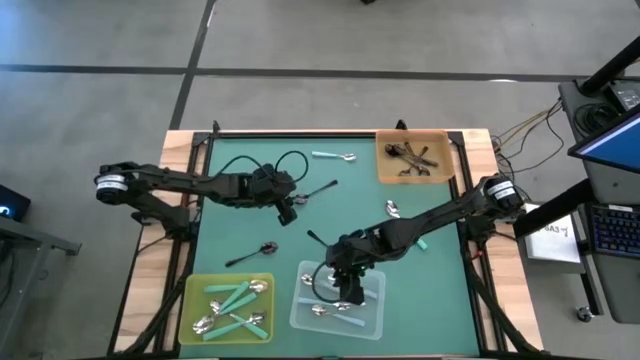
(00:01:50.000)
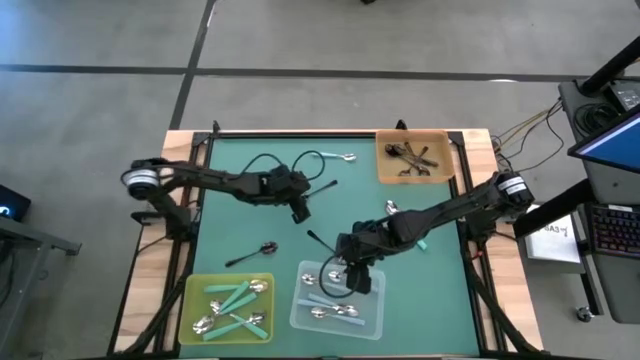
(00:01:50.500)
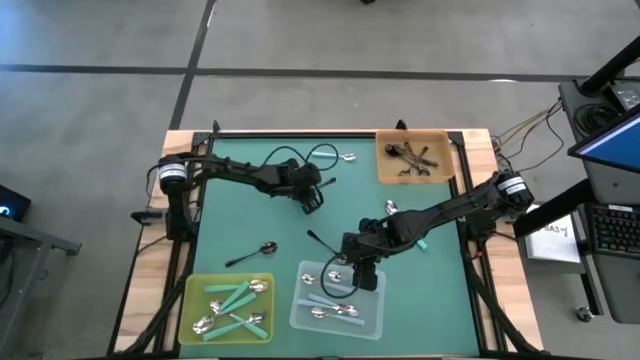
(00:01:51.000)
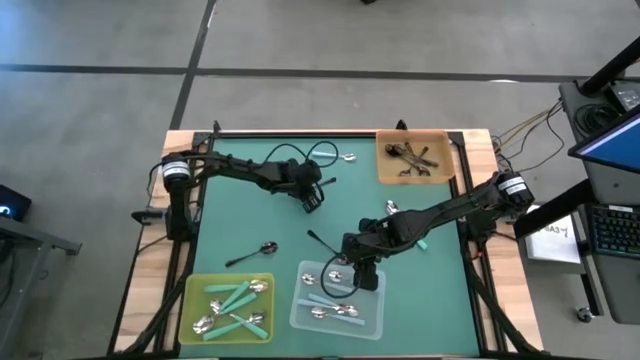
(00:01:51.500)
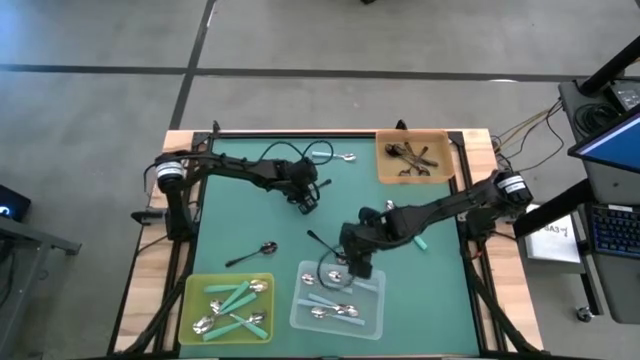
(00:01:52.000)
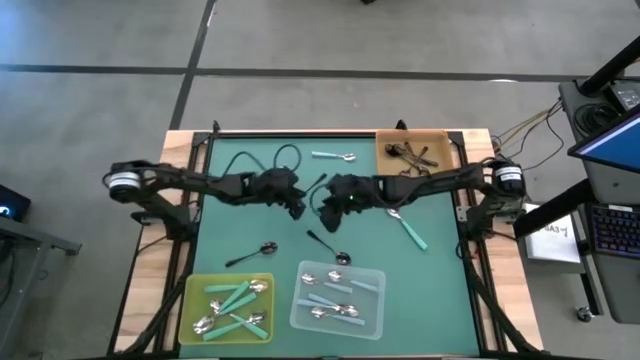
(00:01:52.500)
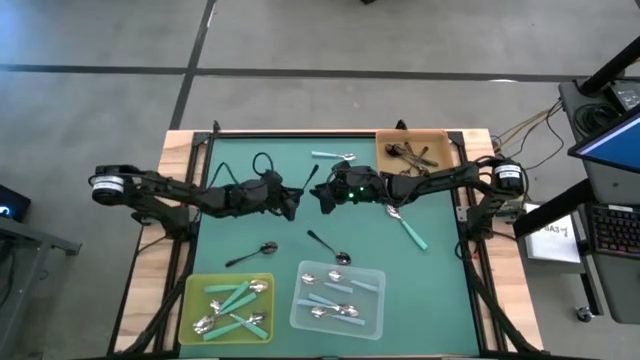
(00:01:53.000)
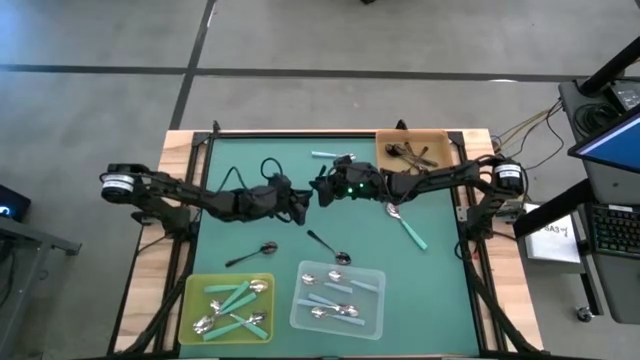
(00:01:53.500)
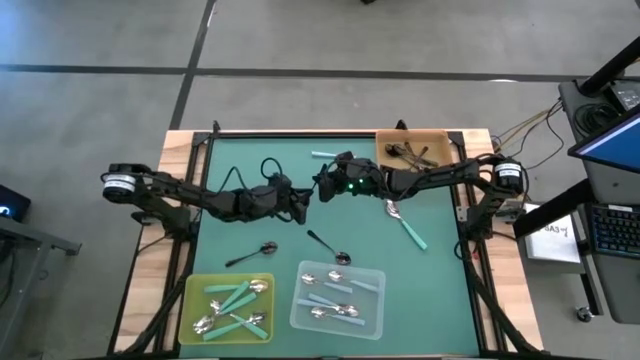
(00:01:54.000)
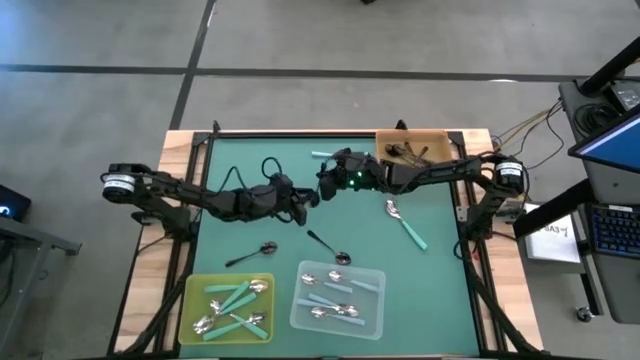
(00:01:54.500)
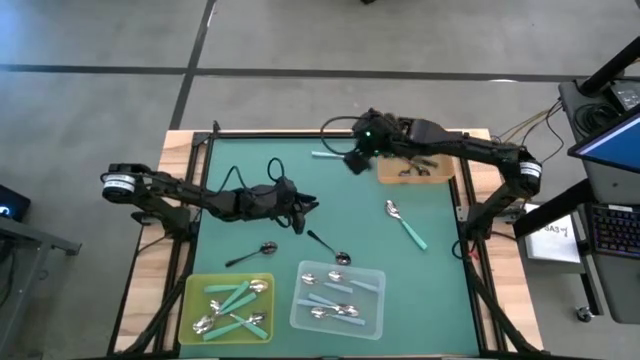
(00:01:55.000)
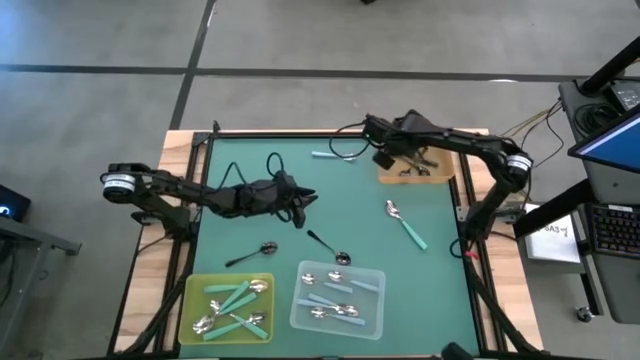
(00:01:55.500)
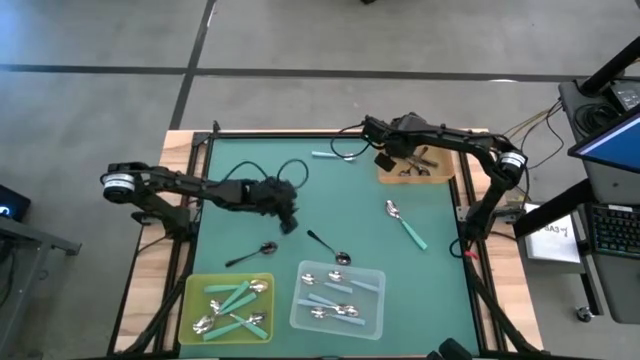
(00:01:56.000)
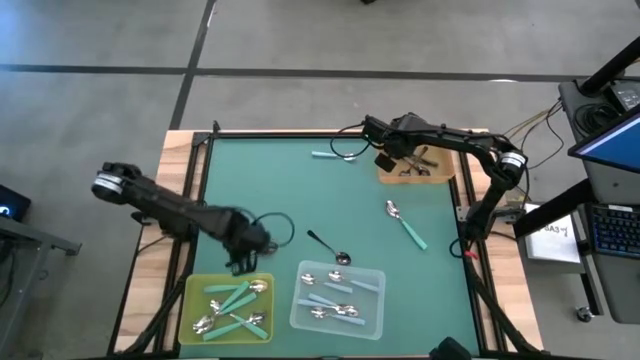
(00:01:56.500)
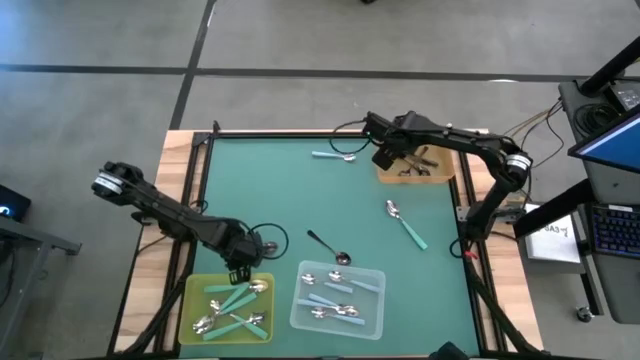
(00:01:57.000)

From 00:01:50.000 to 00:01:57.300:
Task: Sort silverware by color (type)
Put the black spoon into the orange bin

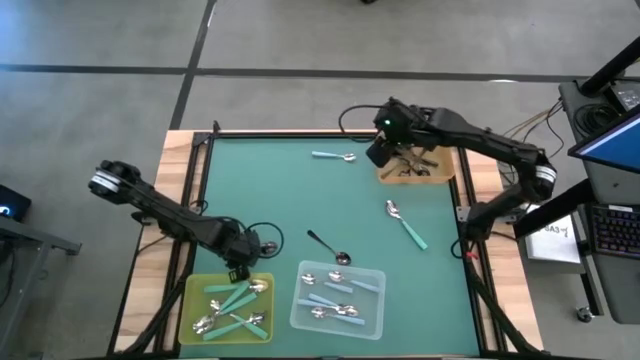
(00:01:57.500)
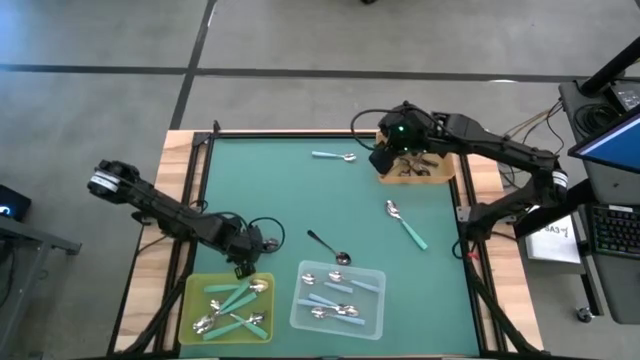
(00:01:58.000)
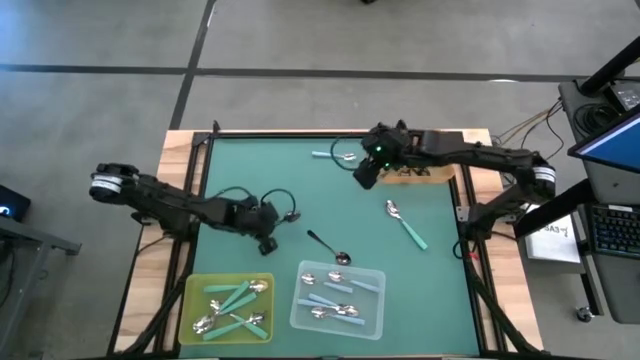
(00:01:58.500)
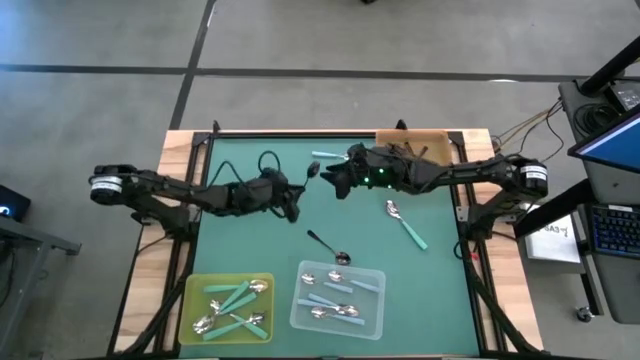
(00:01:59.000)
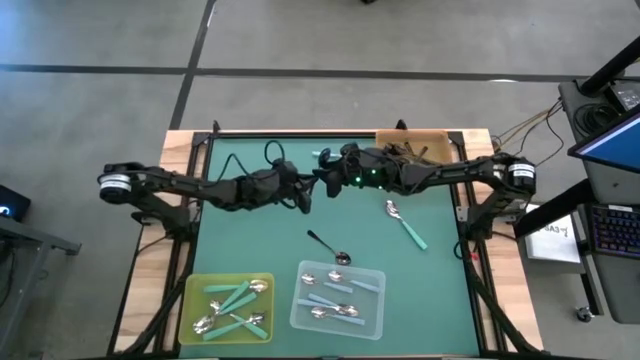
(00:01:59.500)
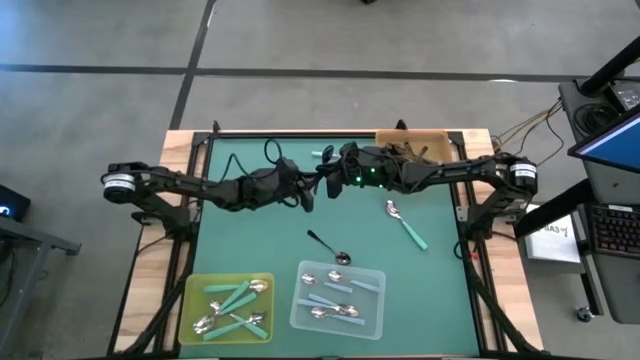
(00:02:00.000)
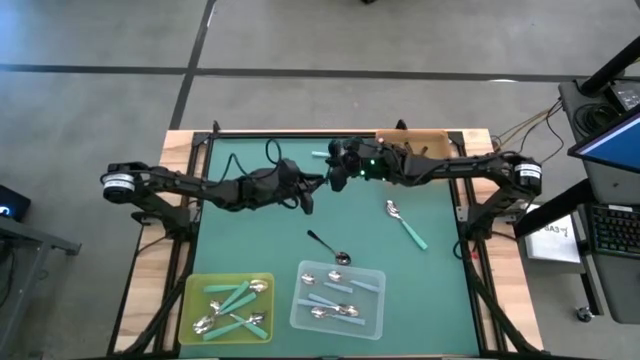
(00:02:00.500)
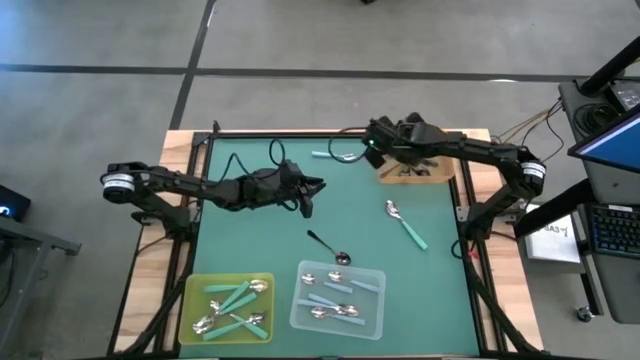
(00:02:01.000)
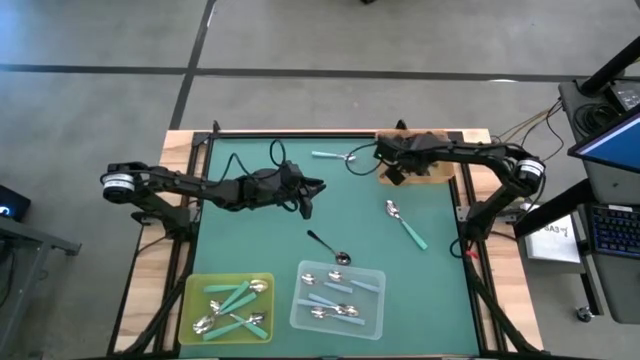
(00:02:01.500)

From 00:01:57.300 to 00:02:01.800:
Put the black spoon into the orange bin

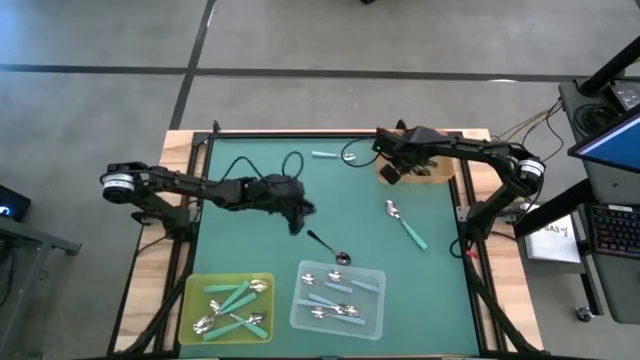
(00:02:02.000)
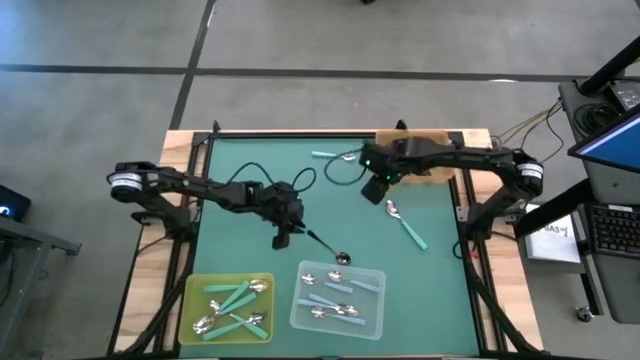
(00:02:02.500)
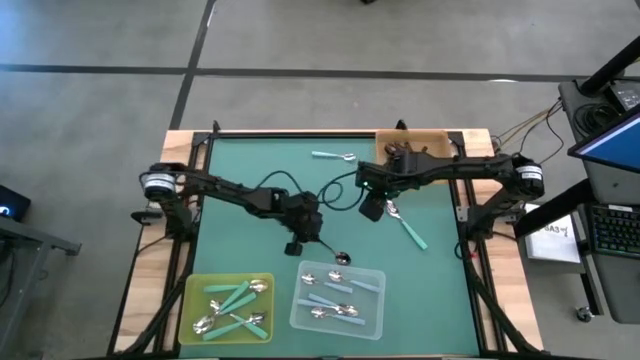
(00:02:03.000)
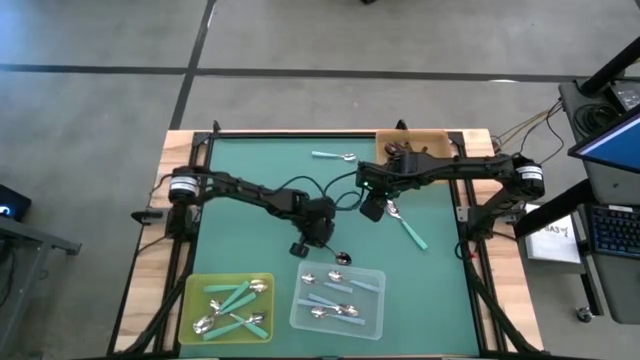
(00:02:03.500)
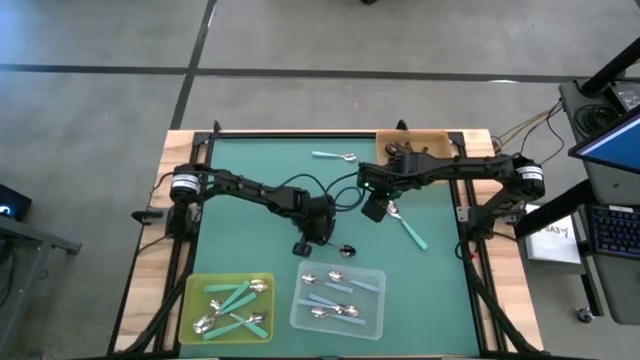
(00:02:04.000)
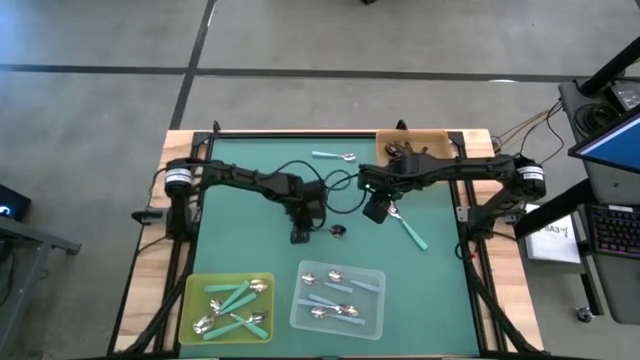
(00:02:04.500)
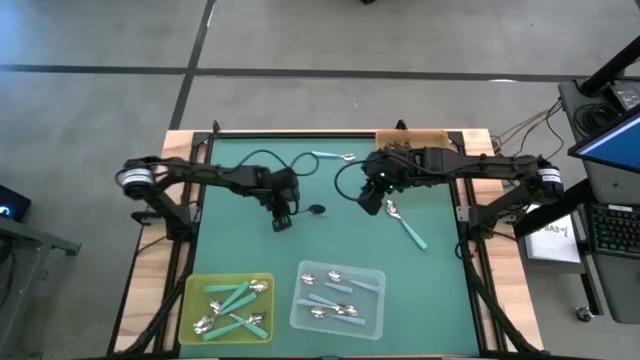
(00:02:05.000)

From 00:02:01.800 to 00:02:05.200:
Put the black spoon into the orange bin

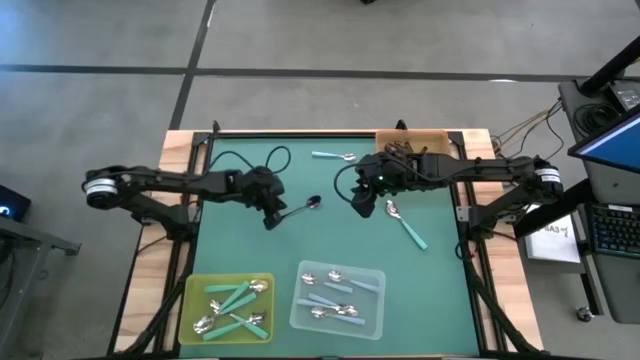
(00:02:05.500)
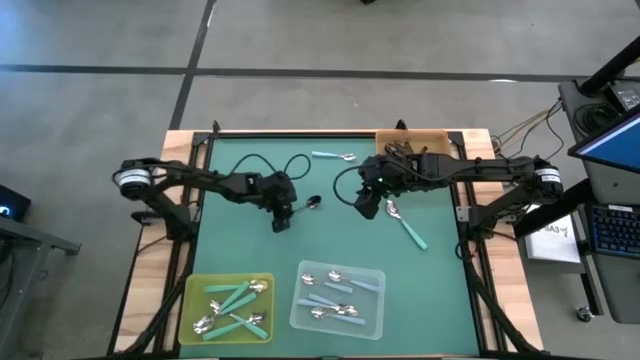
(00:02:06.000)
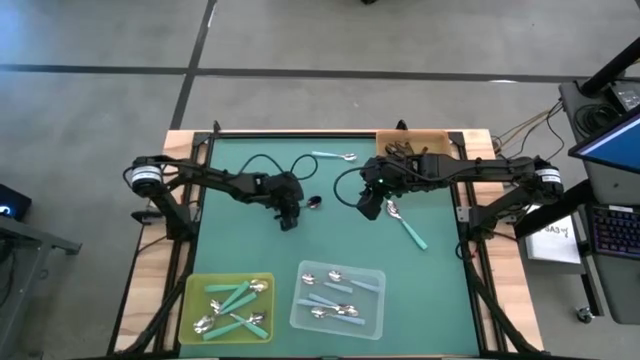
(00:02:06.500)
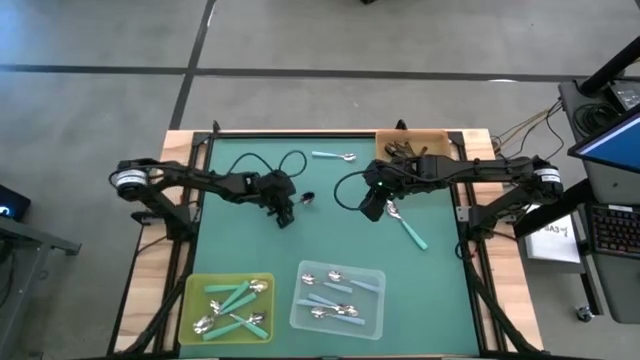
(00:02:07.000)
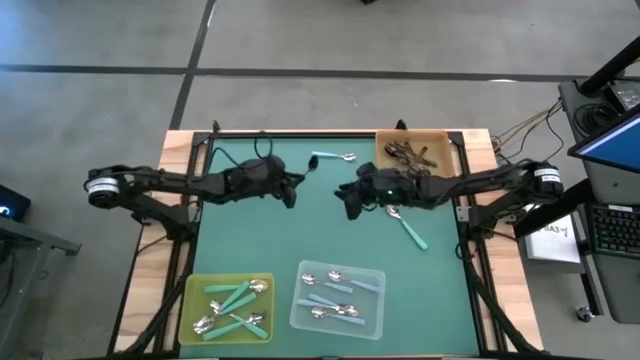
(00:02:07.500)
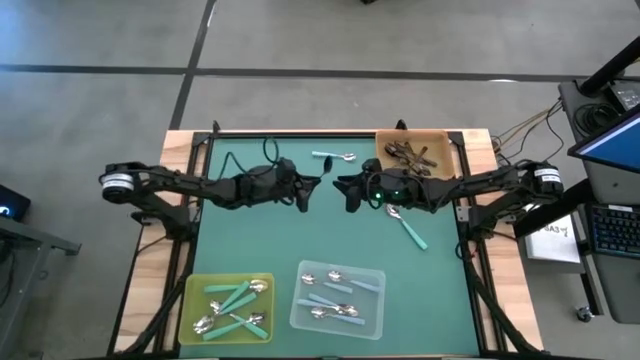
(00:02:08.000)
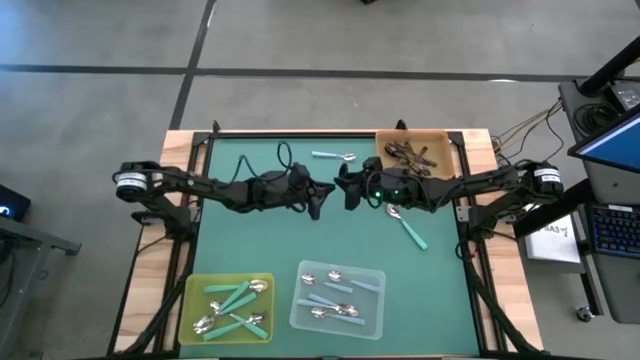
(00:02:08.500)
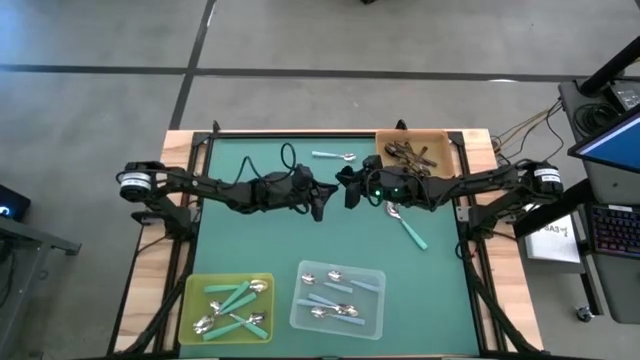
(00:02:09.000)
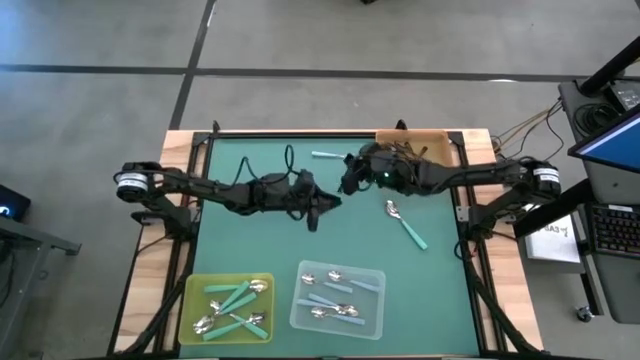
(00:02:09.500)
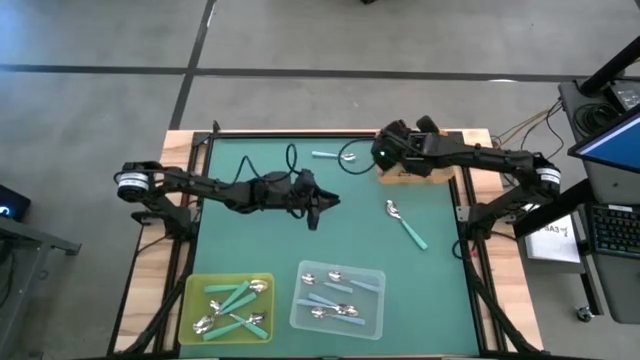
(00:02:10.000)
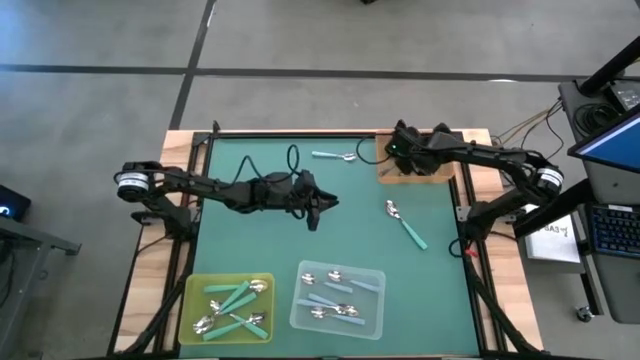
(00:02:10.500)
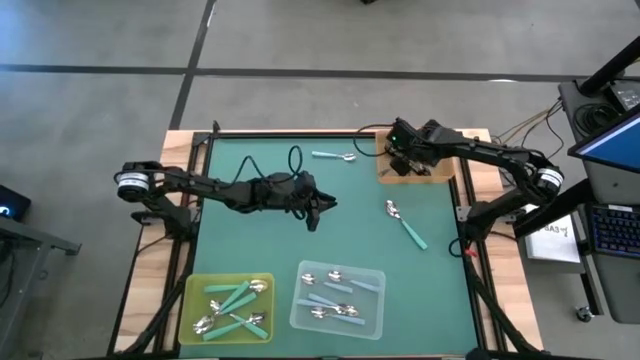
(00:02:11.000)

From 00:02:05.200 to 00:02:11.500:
Put the black spoon into the orange bin
